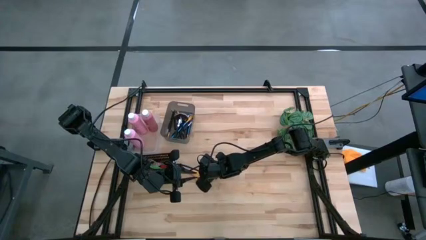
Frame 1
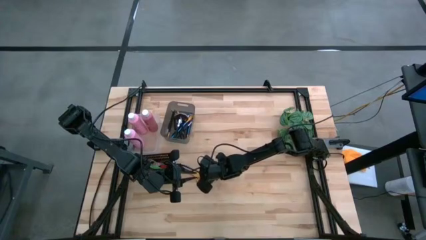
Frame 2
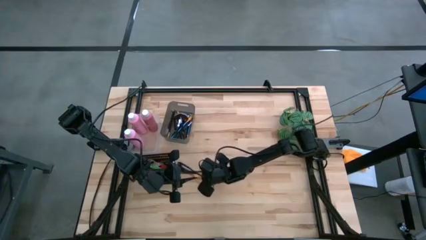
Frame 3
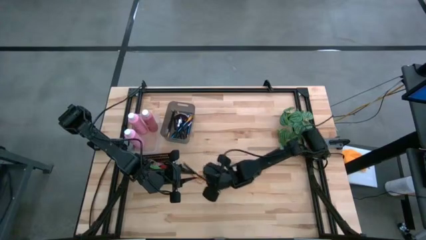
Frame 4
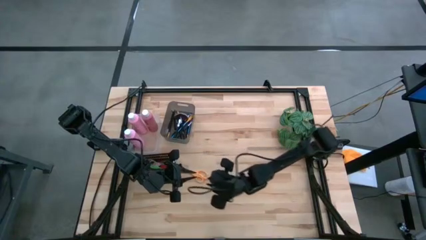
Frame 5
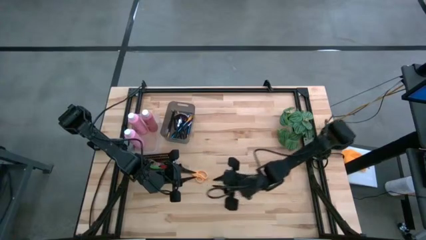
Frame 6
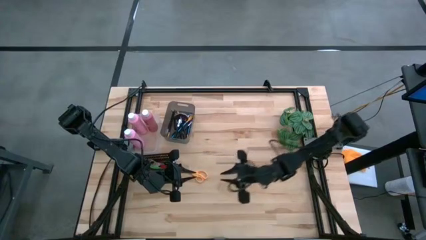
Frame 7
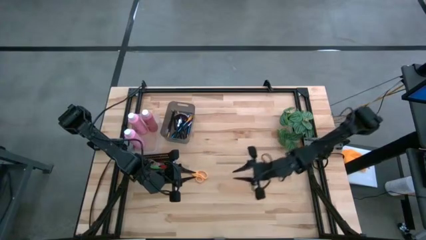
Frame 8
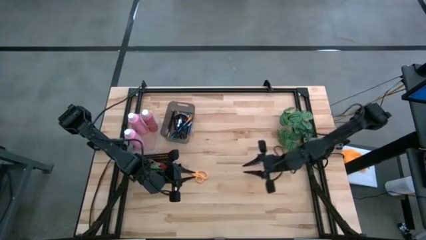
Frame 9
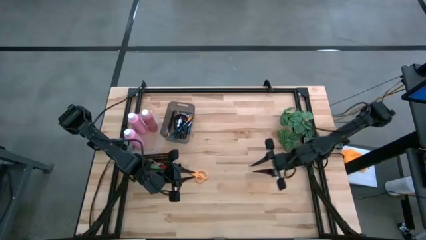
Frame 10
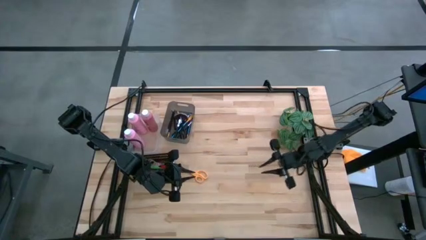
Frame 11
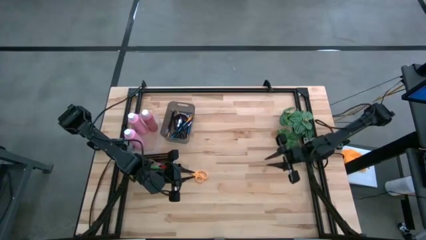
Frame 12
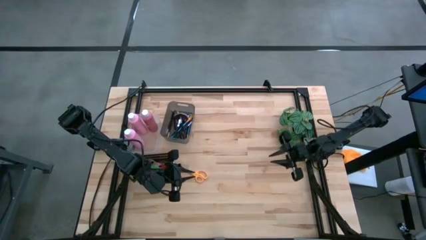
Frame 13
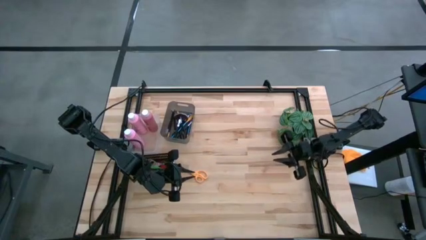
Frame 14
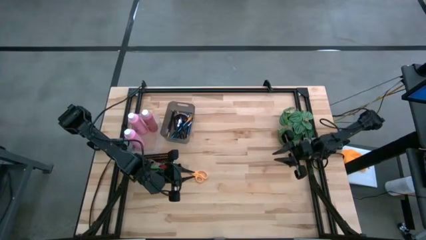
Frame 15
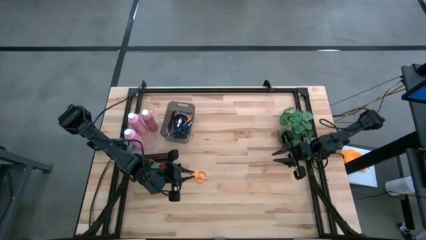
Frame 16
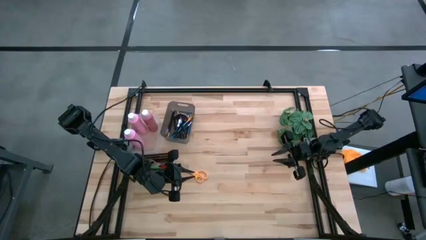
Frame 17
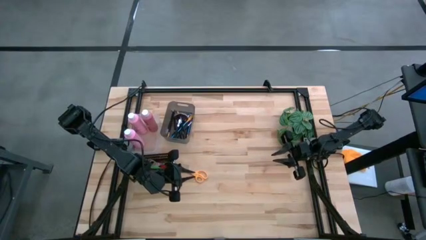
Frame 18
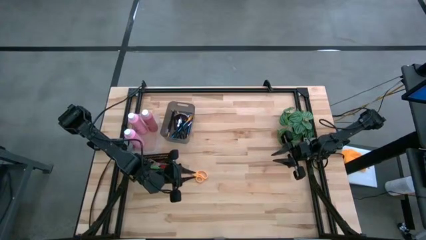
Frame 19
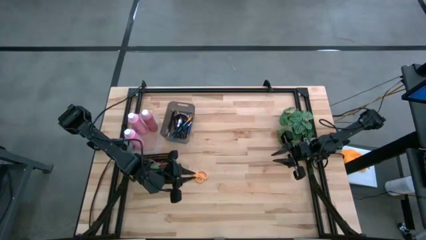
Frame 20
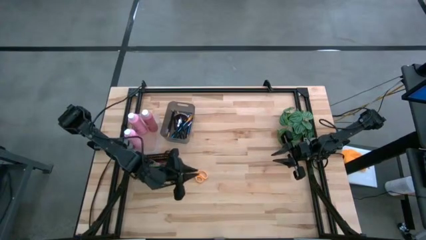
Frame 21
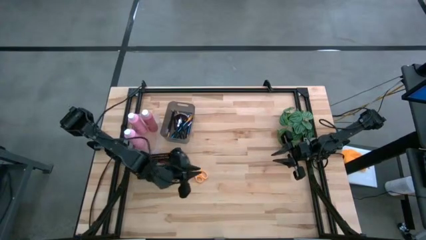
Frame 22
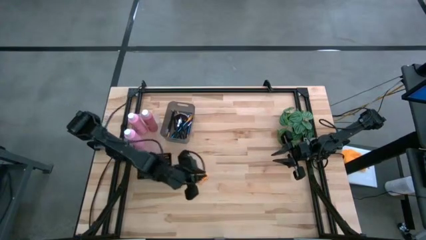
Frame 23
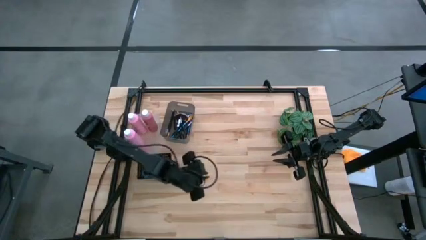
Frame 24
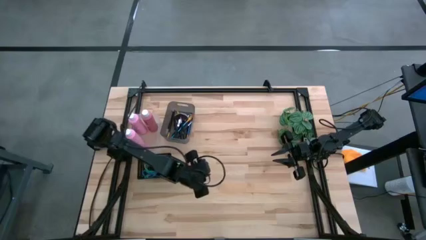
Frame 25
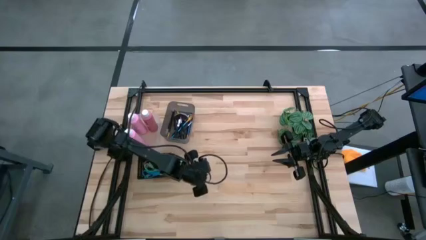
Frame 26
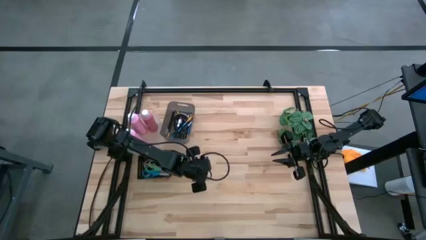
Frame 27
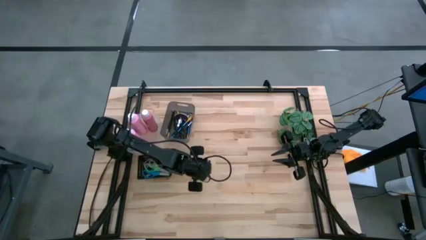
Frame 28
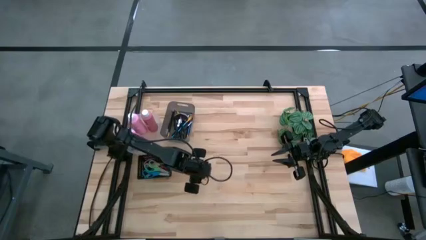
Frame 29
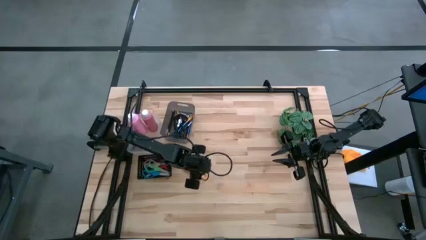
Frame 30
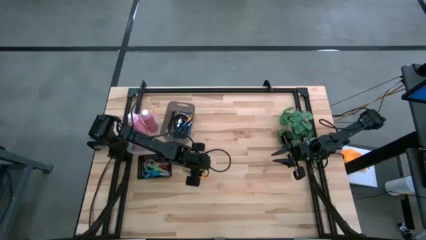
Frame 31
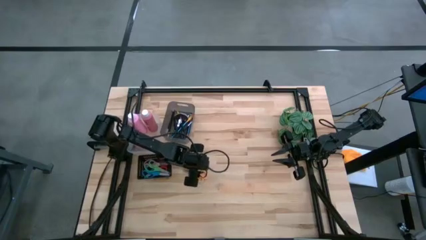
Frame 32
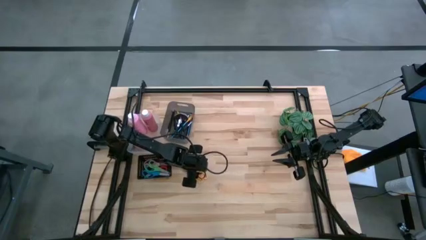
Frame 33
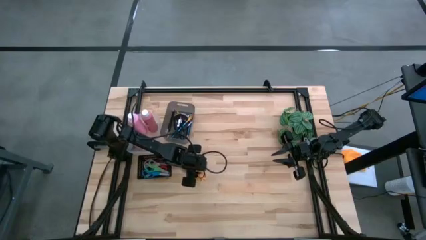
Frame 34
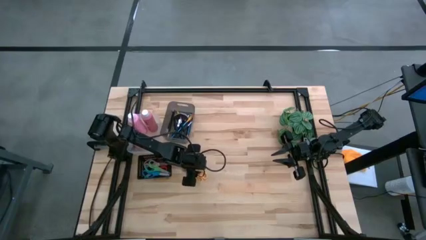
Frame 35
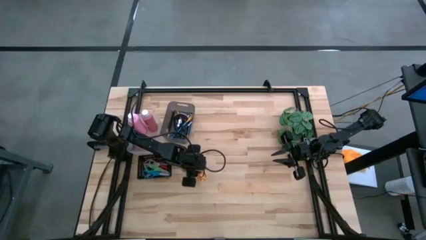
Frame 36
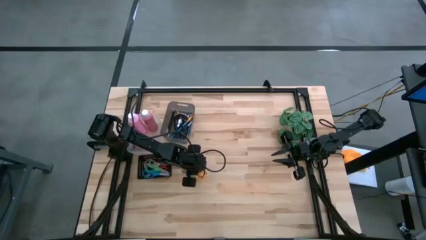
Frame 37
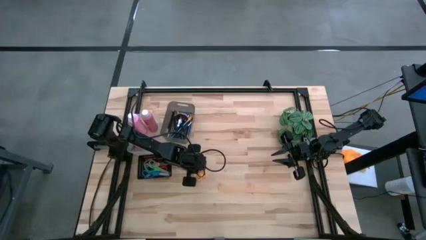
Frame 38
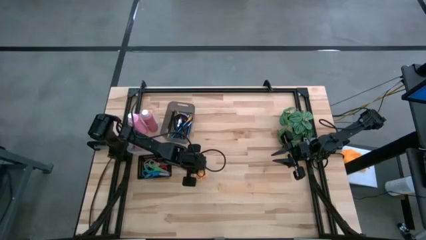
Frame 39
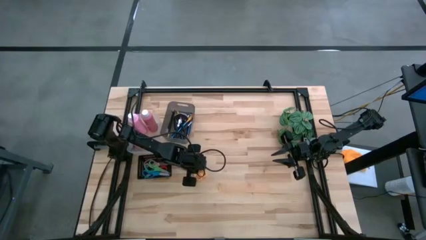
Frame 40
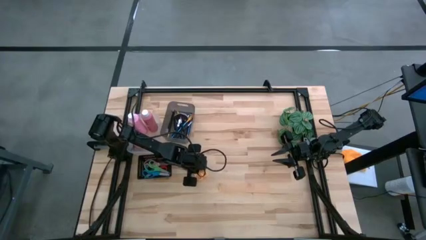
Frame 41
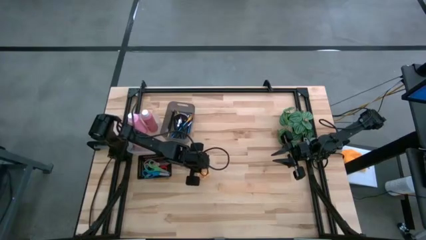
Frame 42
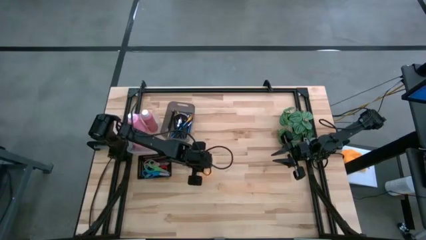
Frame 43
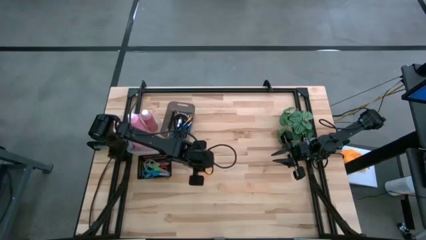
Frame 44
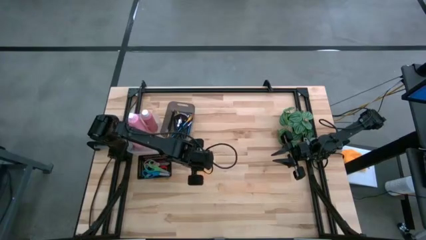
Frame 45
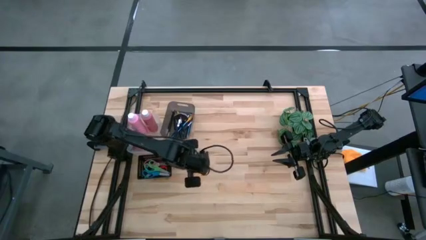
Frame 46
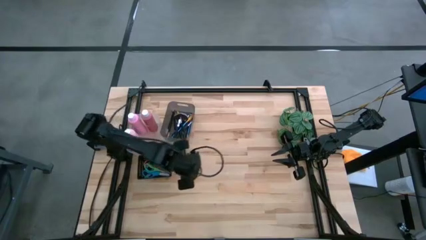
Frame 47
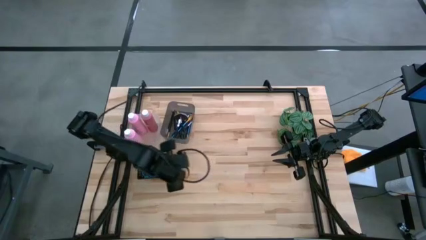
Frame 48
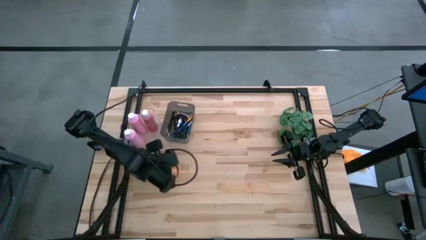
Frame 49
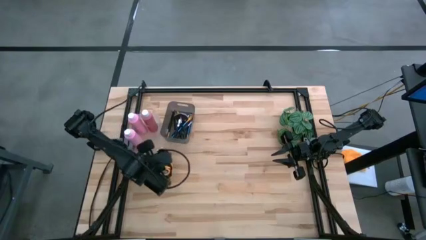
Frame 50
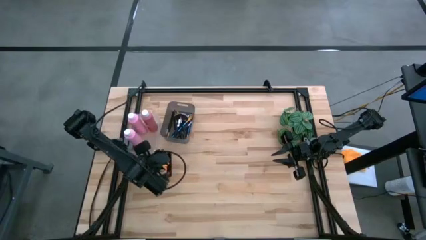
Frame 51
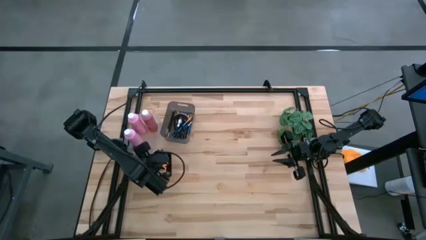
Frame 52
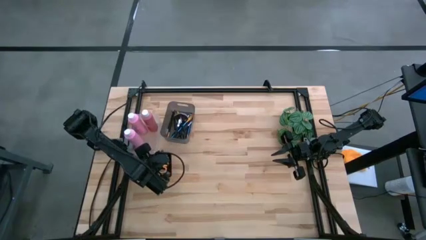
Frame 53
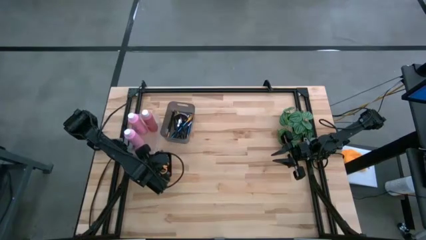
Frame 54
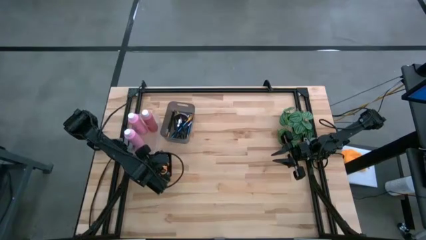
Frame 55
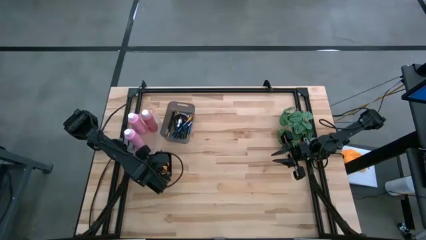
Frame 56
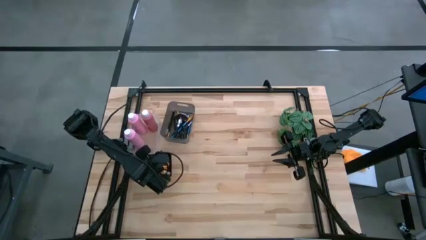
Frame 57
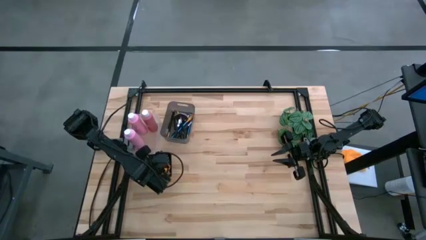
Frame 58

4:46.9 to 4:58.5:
Task: Pick & Place Paint Supplies
Put the yellow scissors into the black basket
